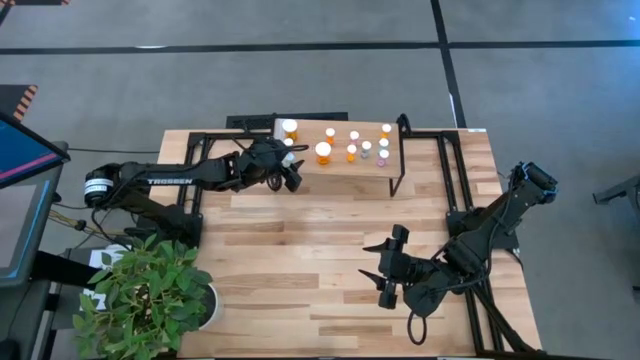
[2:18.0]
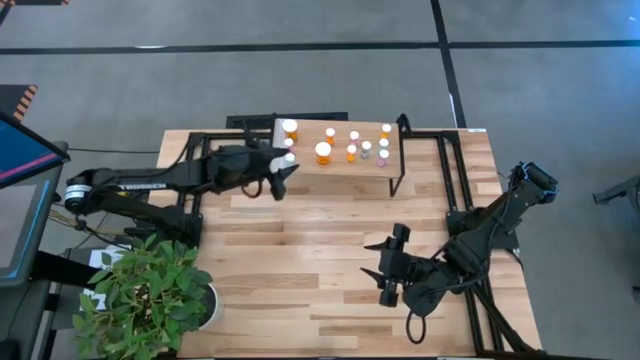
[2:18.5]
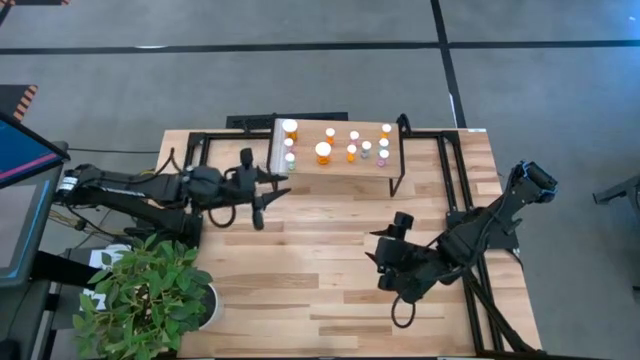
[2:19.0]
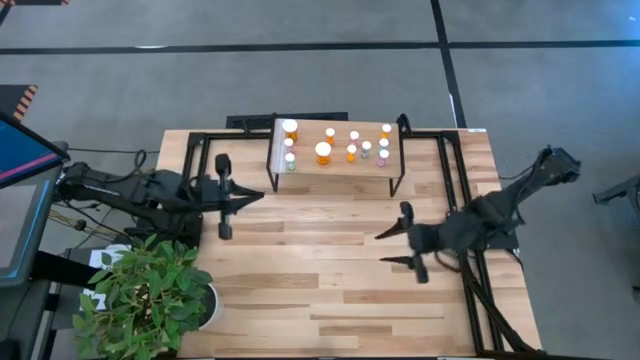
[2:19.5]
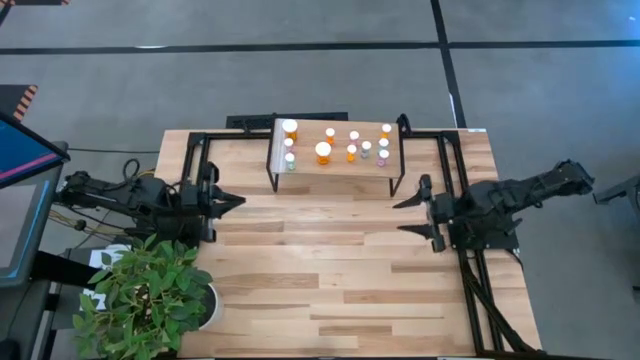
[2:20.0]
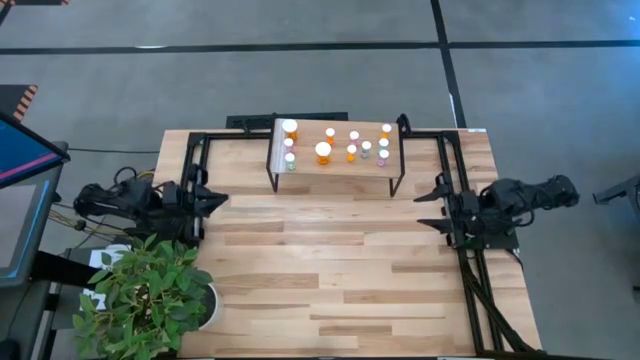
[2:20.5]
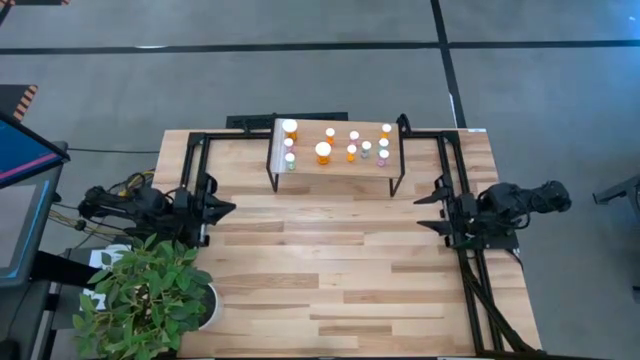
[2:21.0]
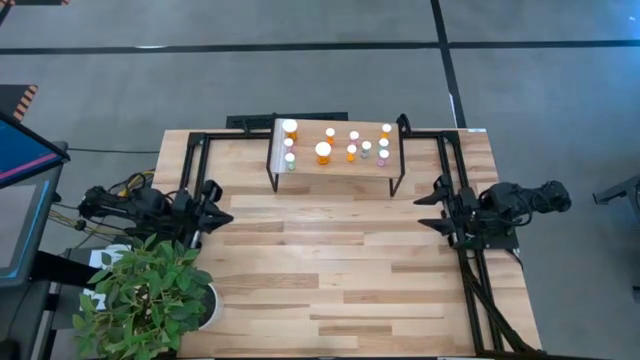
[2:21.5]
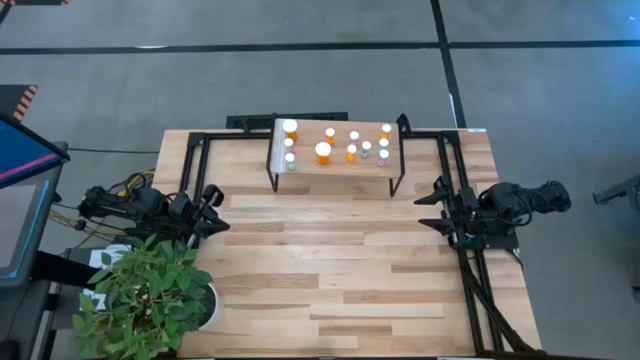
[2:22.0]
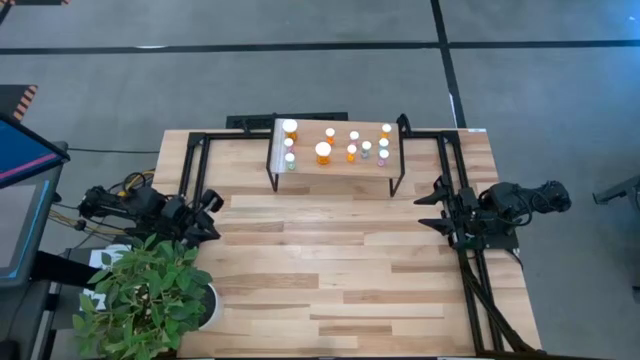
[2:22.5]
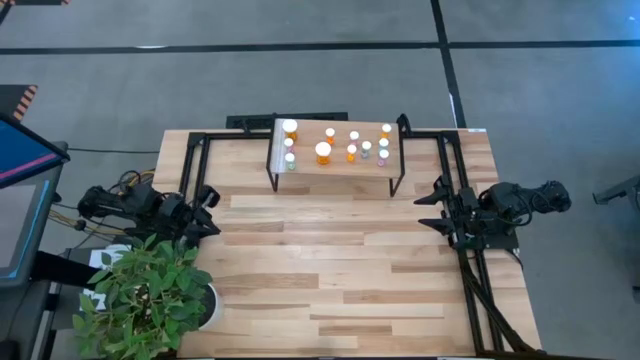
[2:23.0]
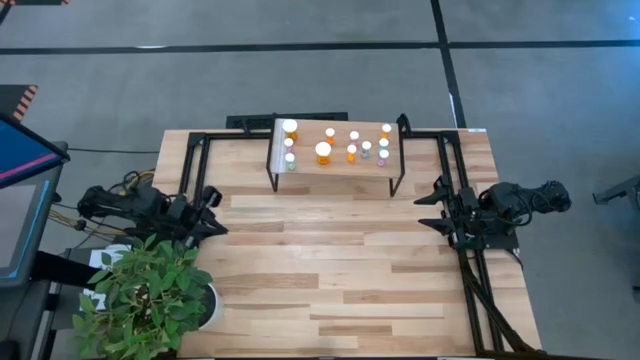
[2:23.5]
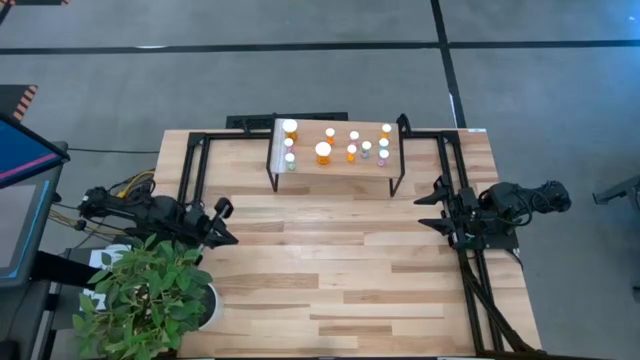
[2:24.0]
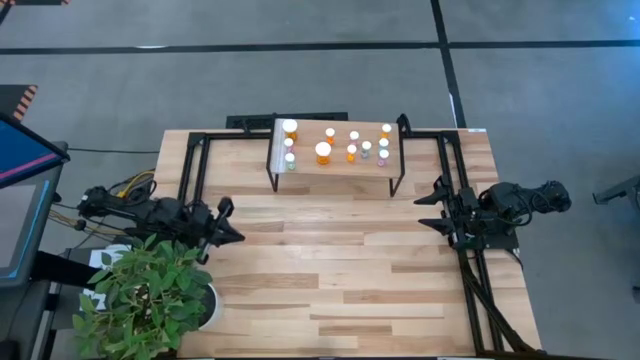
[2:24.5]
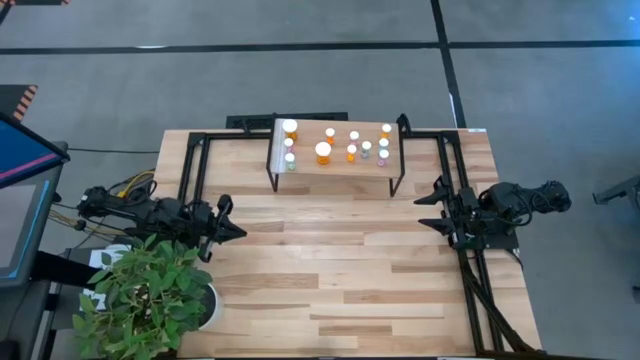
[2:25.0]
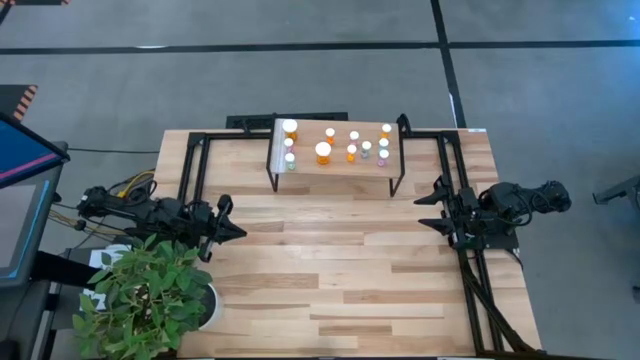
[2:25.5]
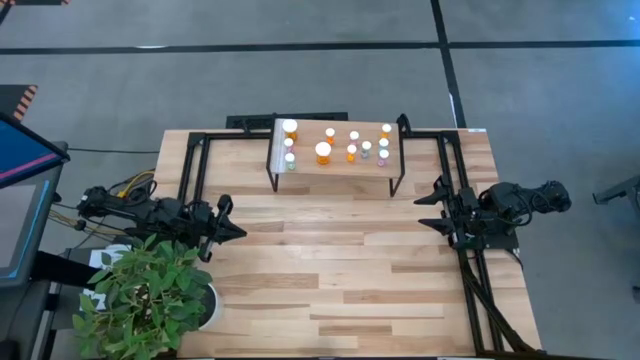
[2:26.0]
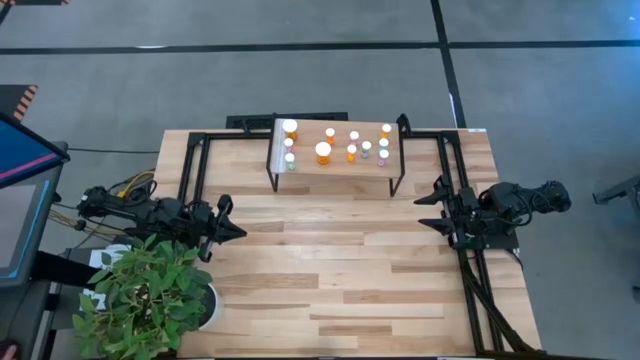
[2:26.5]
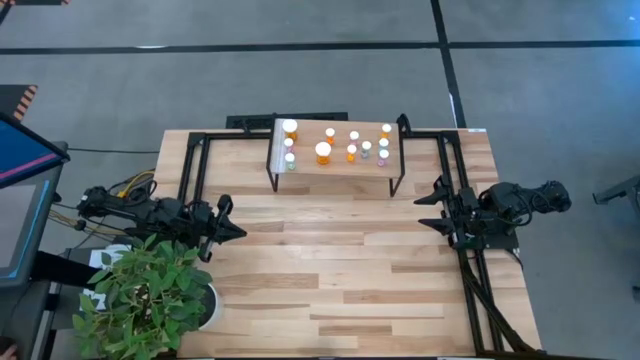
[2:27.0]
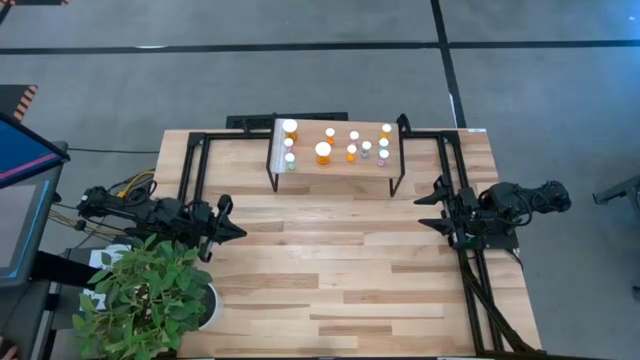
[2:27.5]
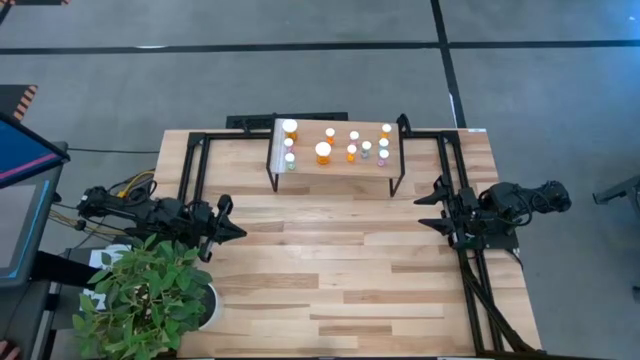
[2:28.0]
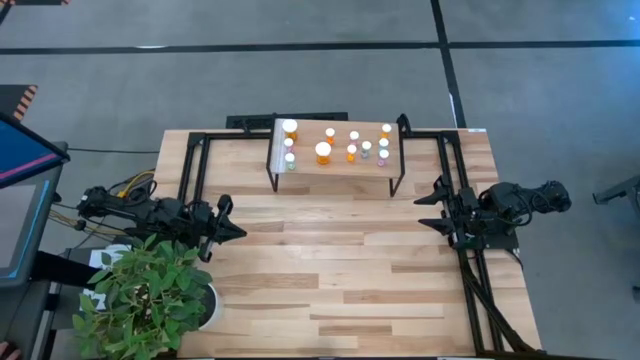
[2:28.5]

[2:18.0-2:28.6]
Task: Pick and place medicine bottles onto shelf by color
Return to Home Position

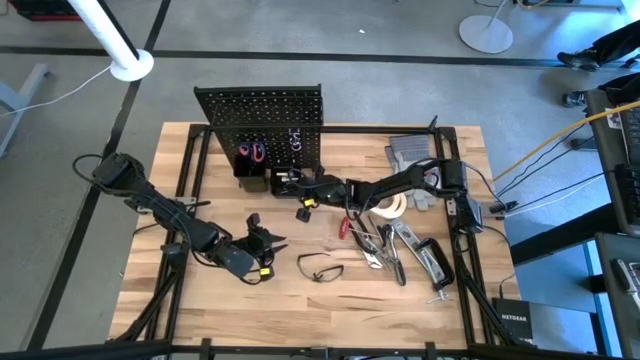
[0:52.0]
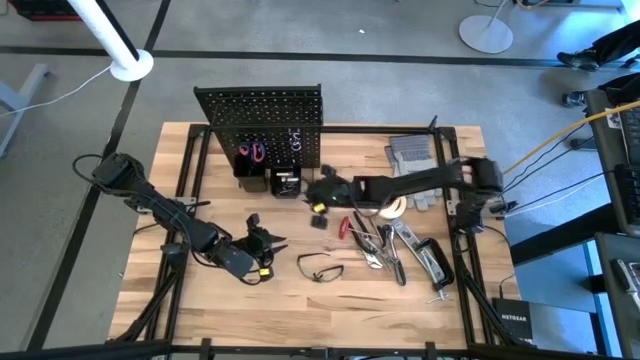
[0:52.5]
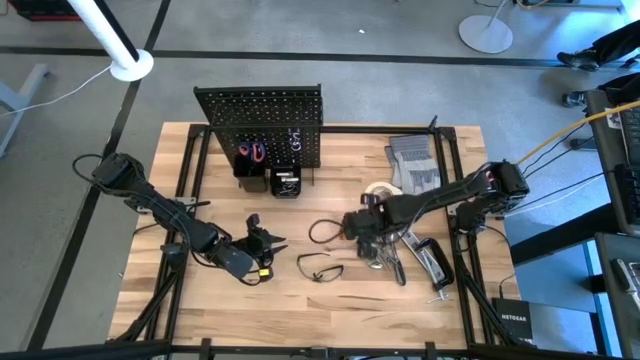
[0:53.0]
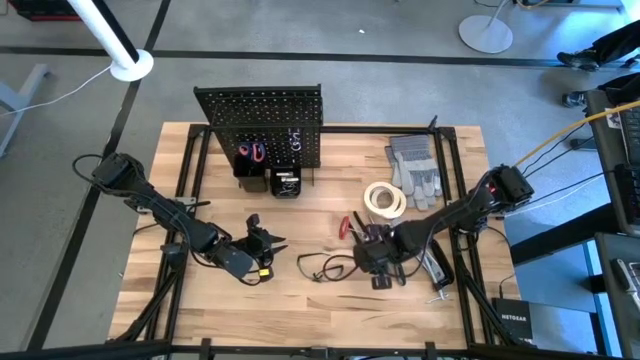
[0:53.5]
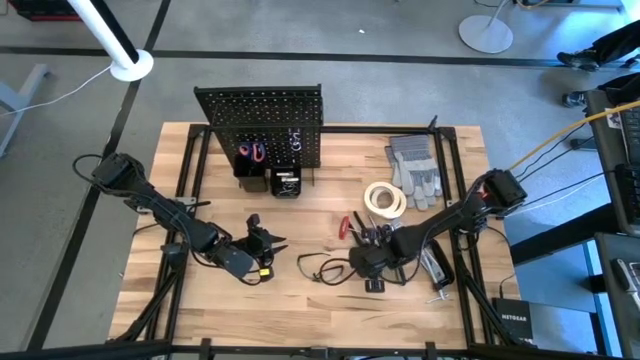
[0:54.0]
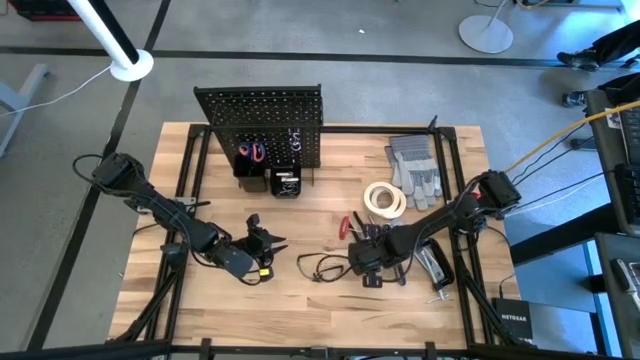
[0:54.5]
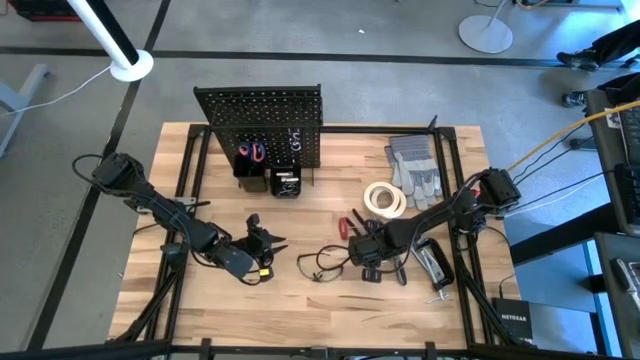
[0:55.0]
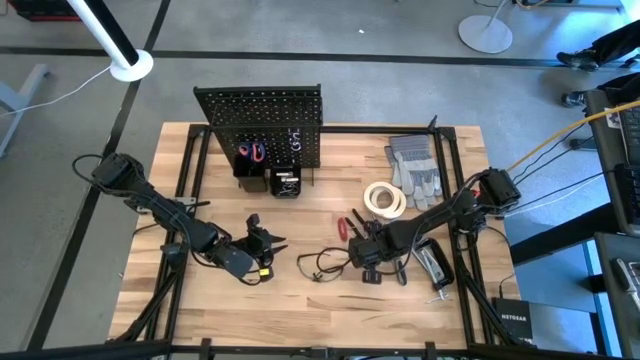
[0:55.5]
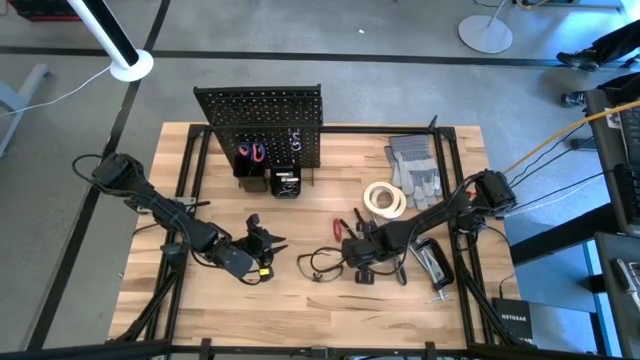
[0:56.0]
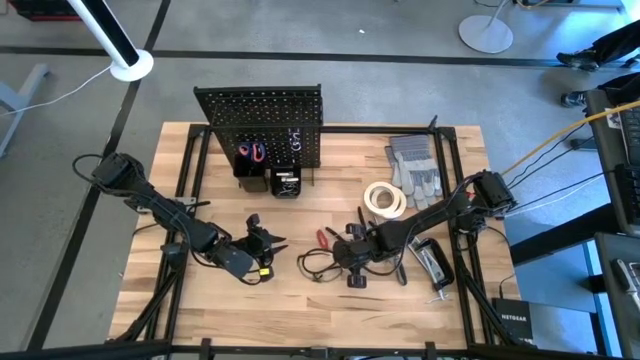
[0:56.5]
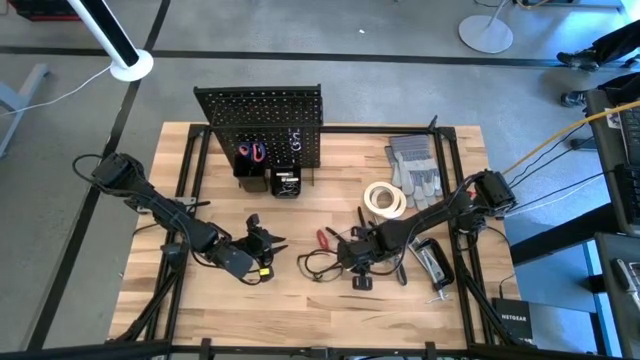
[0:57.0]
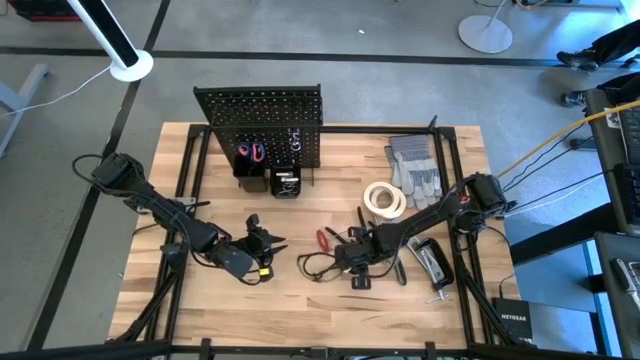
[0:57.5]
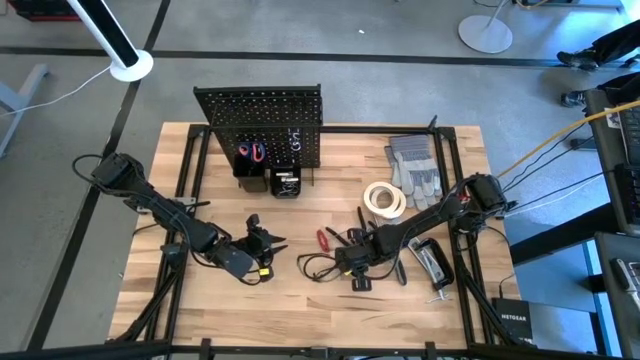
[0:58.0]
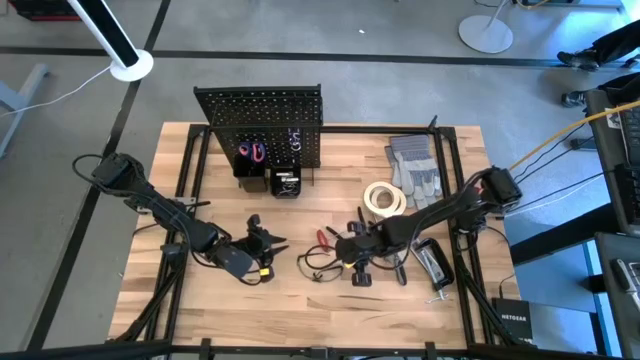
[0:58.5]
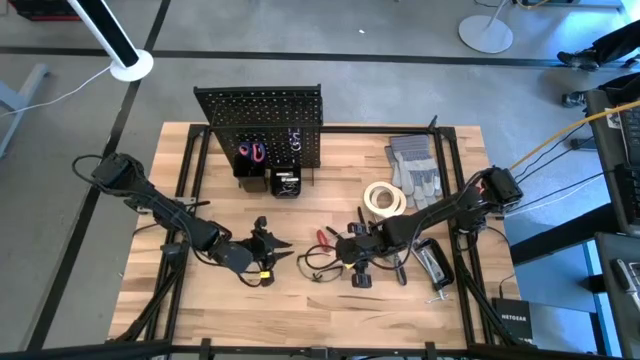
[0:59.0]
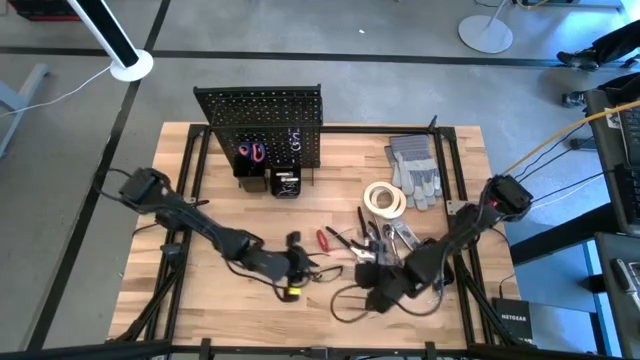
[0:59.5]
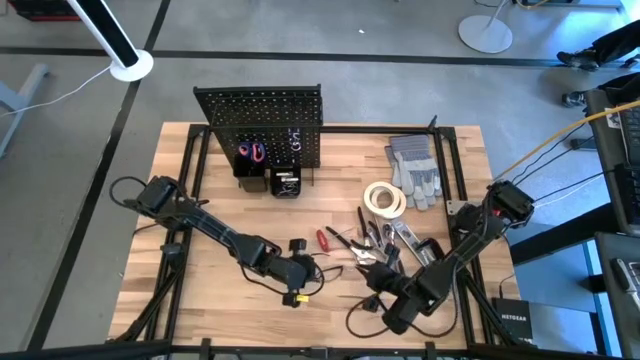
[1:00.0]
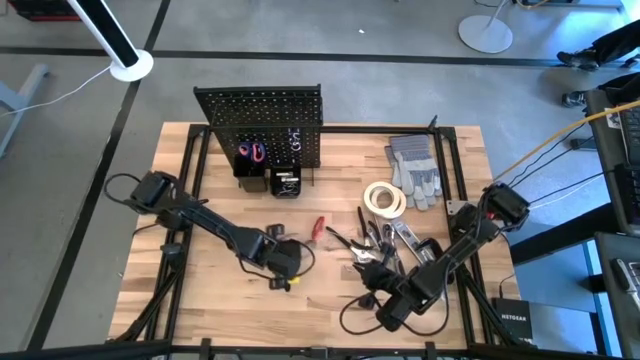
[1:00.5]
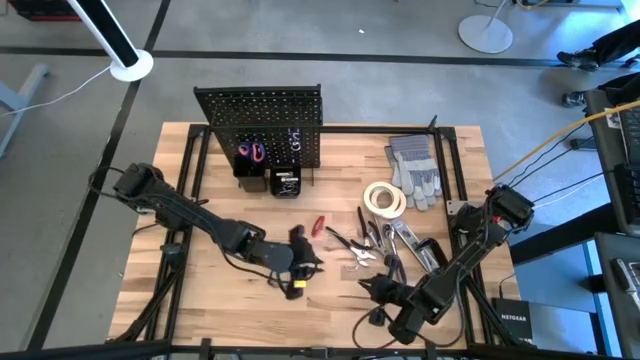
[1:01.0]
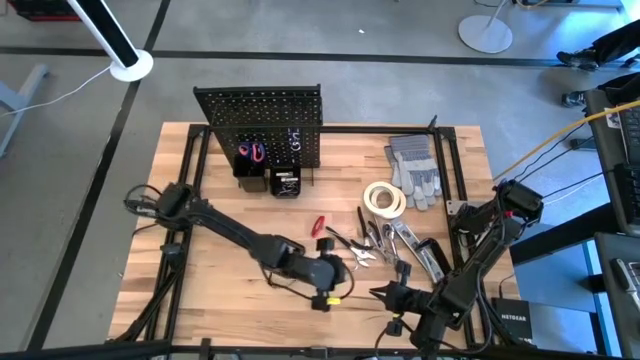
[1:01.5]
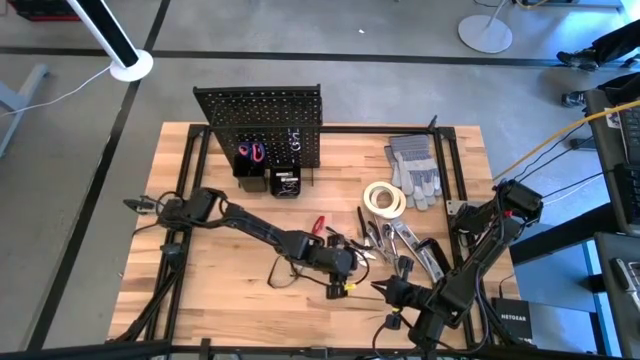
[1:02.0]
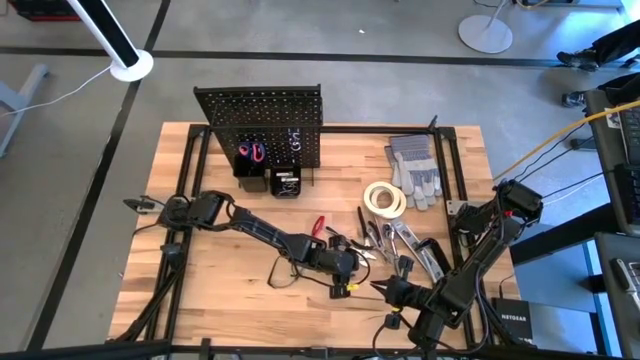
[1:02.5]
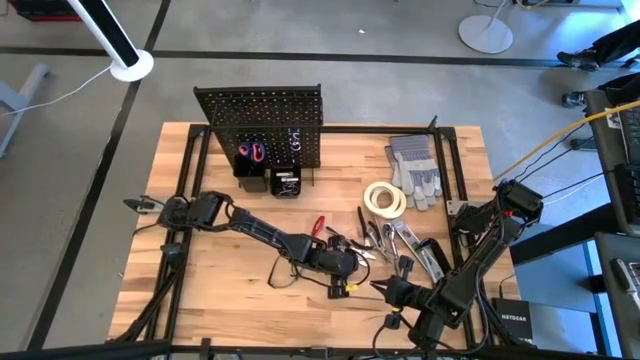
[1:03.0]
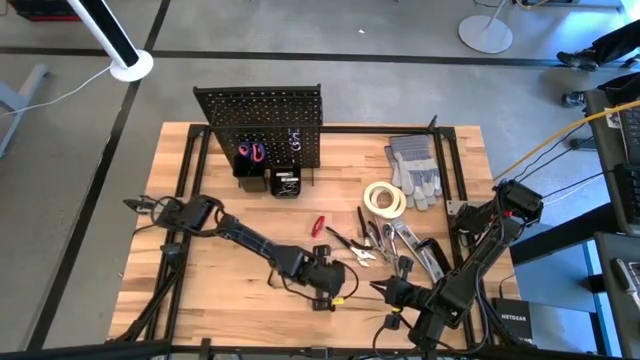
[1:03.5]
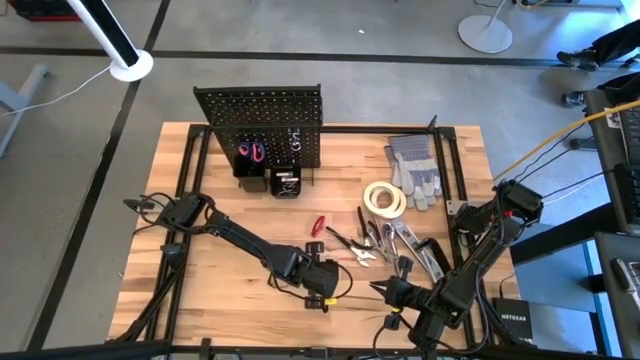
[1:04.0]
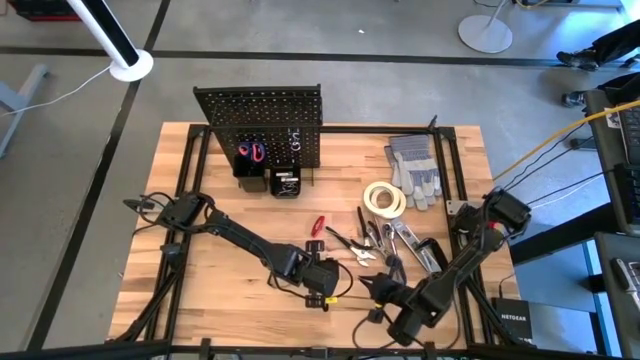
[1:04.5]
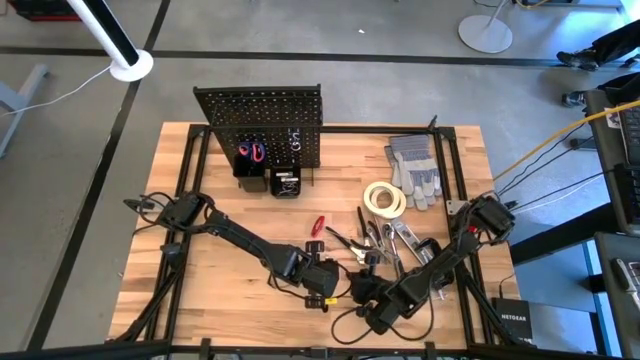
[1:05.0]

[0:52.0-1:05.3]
Task: Hang tools onto peg board
Put the hook into the right pegboard organizer bin
